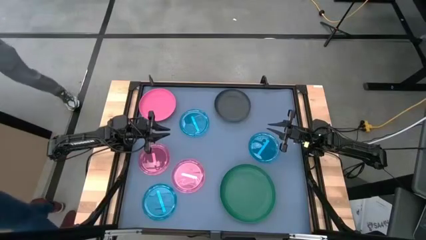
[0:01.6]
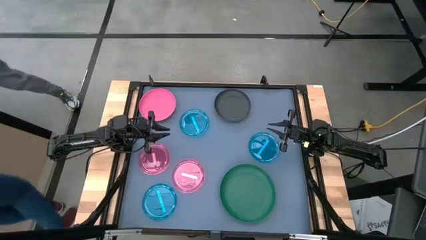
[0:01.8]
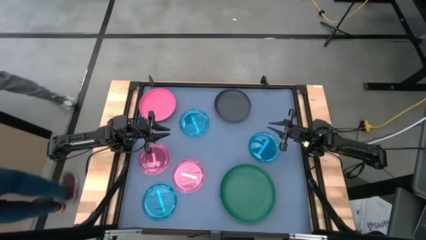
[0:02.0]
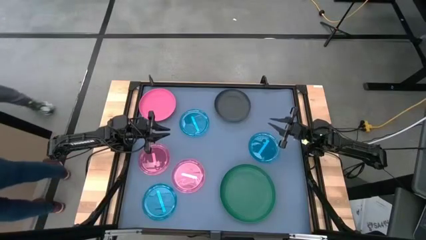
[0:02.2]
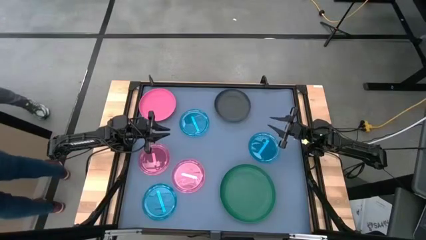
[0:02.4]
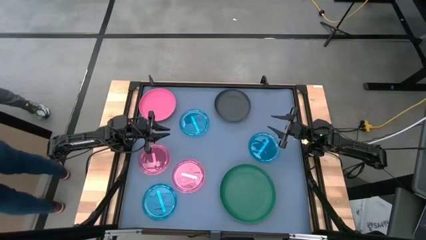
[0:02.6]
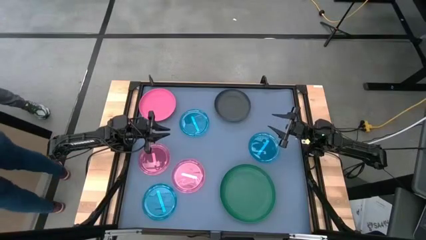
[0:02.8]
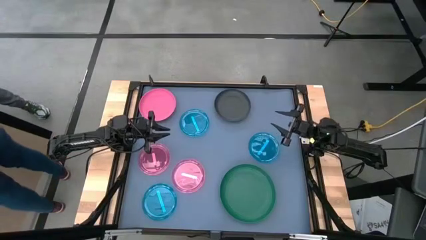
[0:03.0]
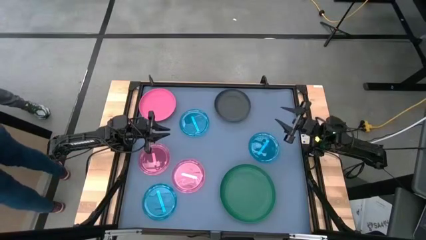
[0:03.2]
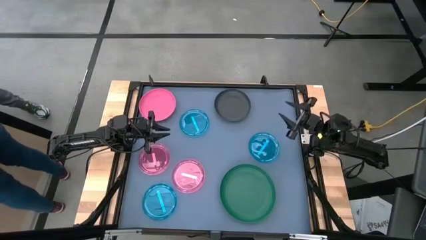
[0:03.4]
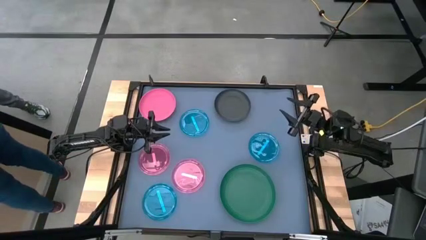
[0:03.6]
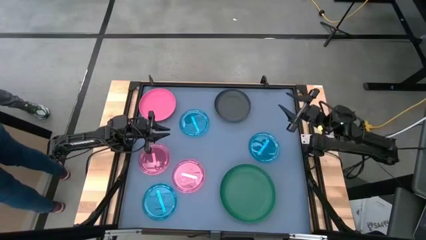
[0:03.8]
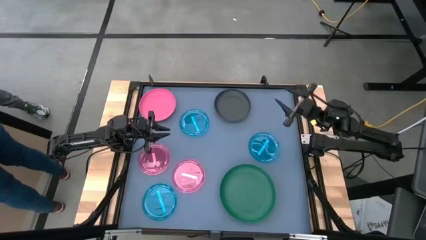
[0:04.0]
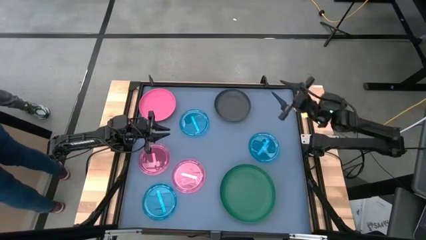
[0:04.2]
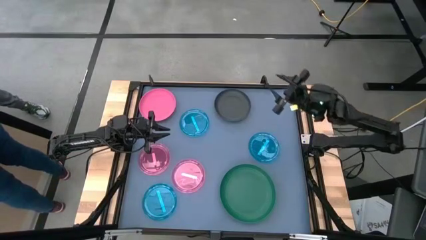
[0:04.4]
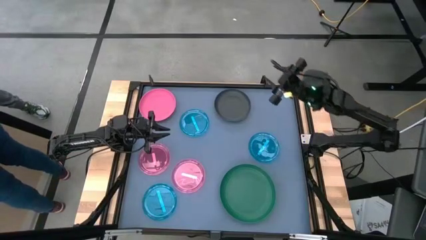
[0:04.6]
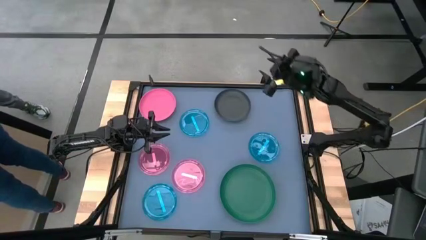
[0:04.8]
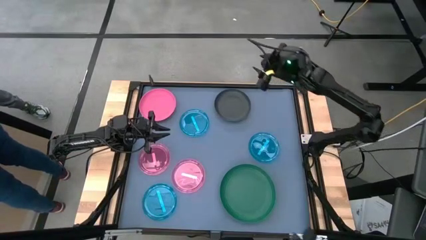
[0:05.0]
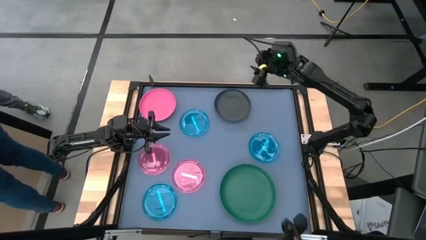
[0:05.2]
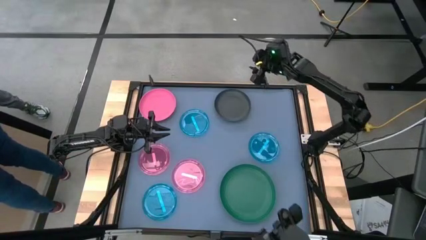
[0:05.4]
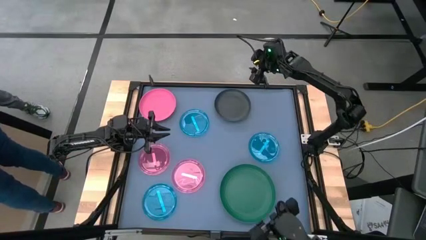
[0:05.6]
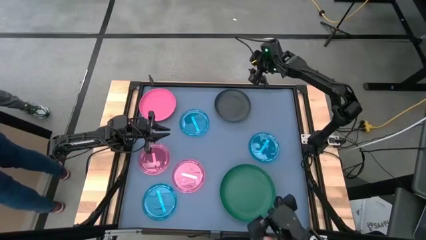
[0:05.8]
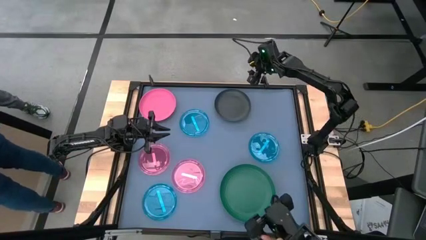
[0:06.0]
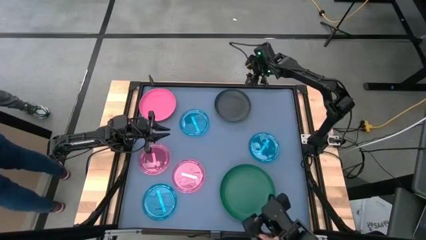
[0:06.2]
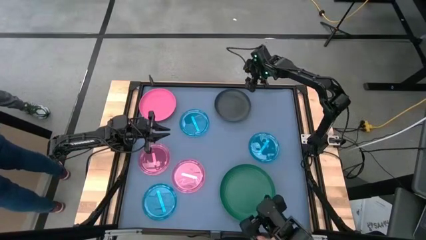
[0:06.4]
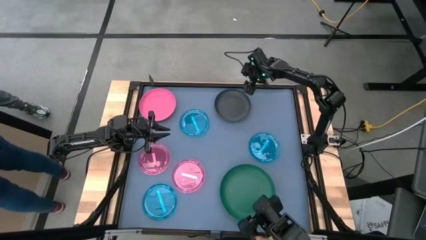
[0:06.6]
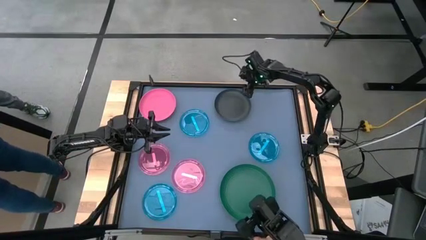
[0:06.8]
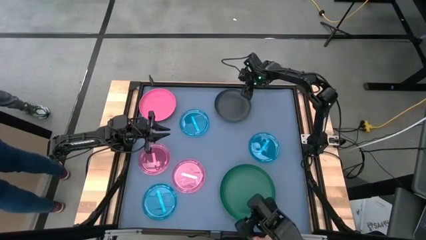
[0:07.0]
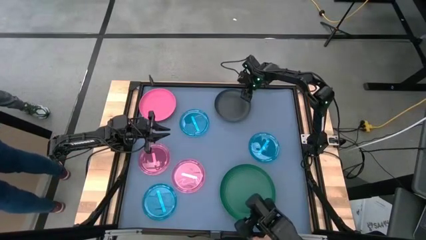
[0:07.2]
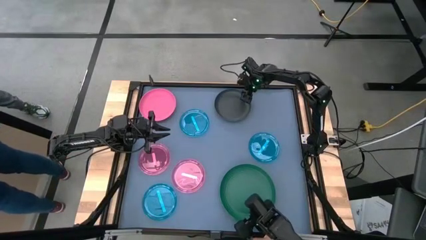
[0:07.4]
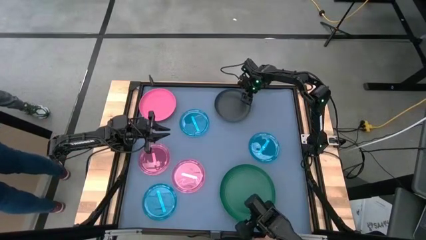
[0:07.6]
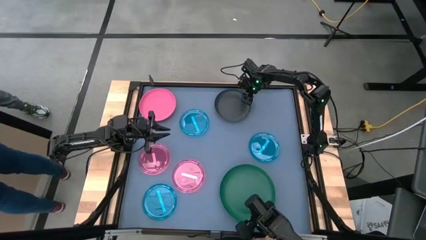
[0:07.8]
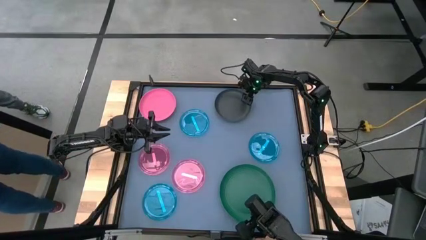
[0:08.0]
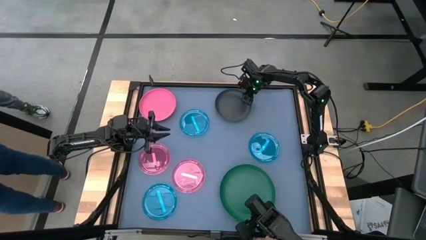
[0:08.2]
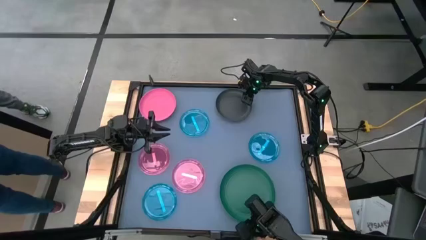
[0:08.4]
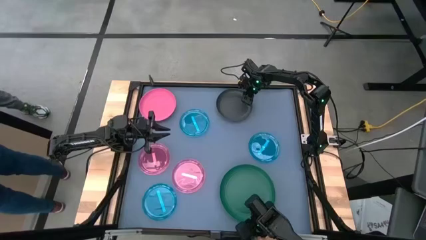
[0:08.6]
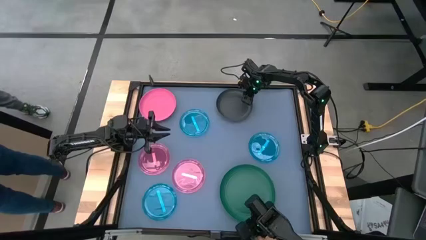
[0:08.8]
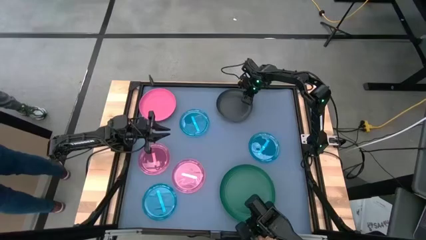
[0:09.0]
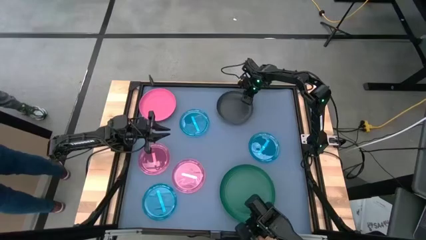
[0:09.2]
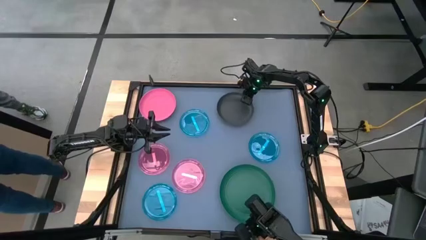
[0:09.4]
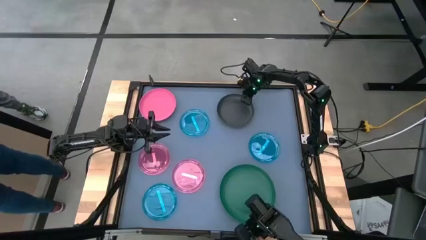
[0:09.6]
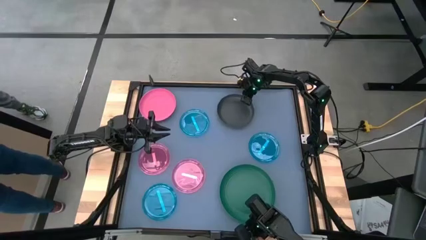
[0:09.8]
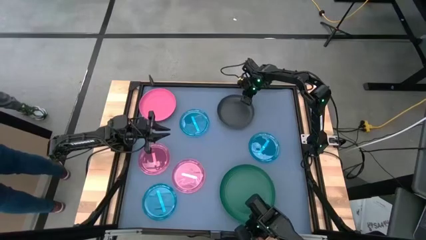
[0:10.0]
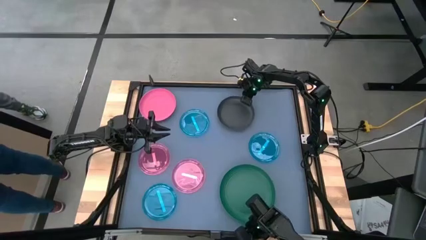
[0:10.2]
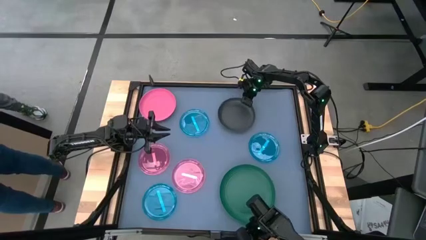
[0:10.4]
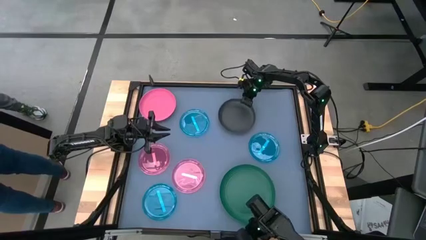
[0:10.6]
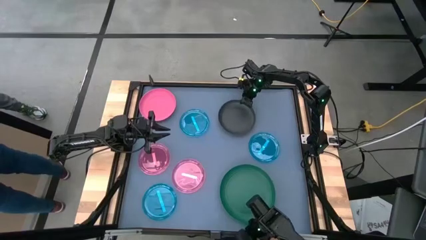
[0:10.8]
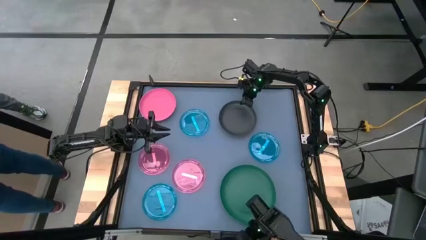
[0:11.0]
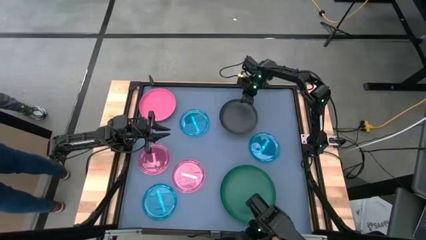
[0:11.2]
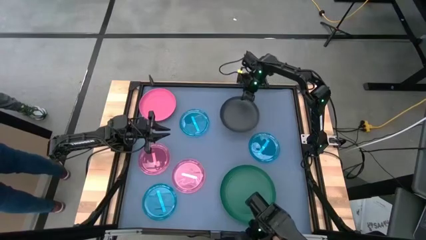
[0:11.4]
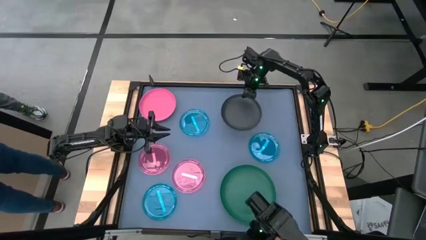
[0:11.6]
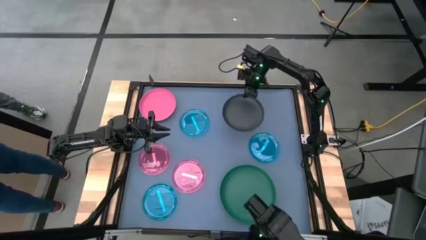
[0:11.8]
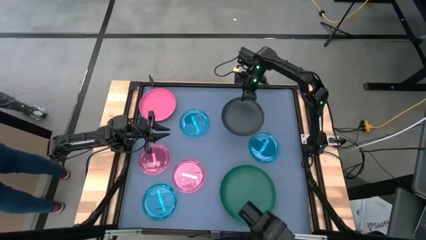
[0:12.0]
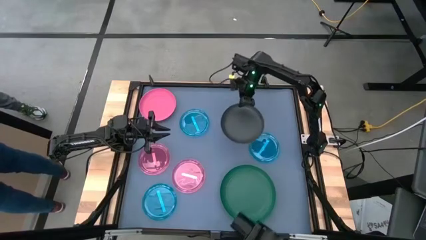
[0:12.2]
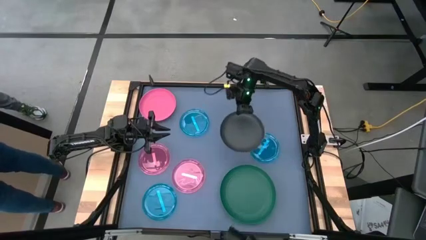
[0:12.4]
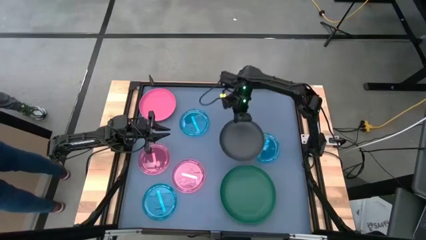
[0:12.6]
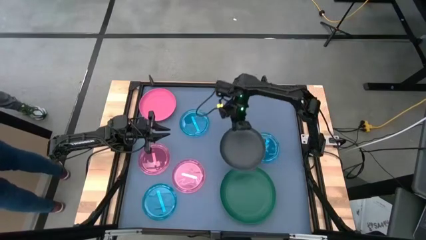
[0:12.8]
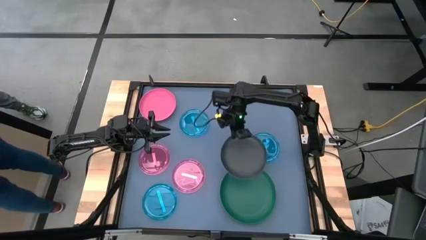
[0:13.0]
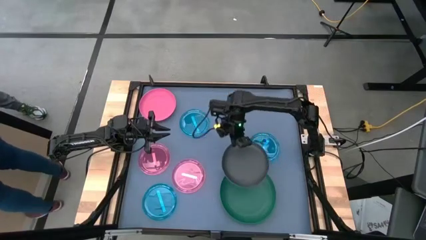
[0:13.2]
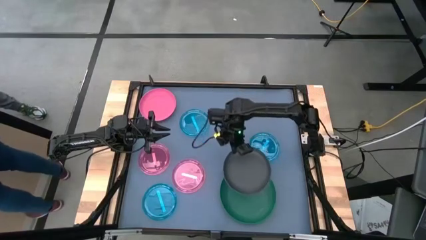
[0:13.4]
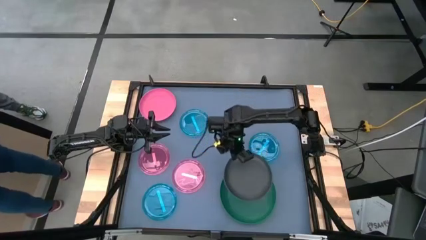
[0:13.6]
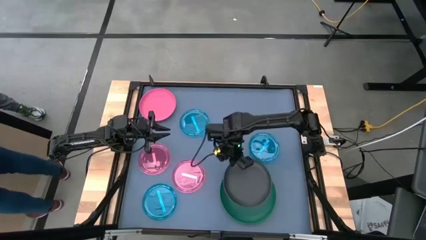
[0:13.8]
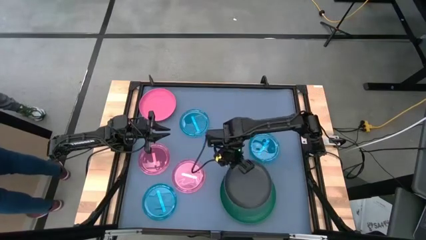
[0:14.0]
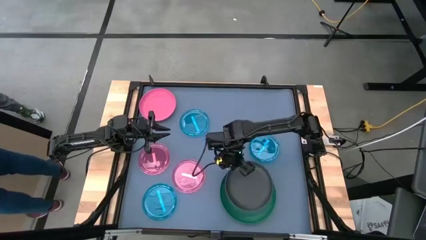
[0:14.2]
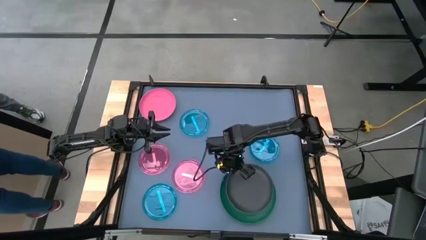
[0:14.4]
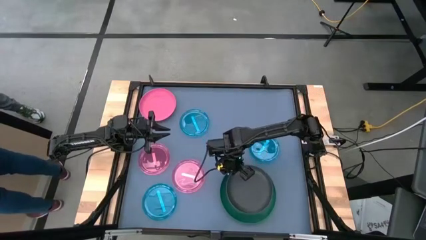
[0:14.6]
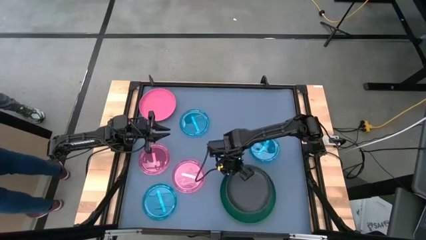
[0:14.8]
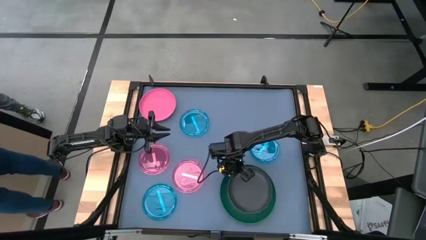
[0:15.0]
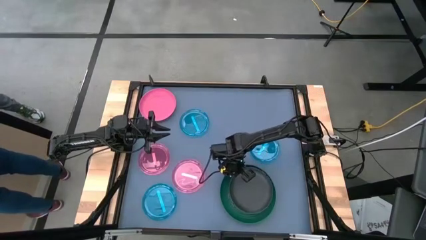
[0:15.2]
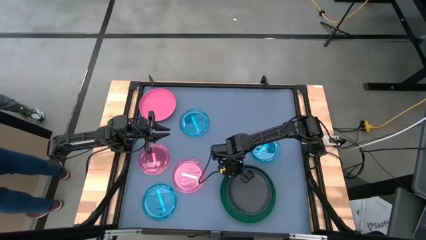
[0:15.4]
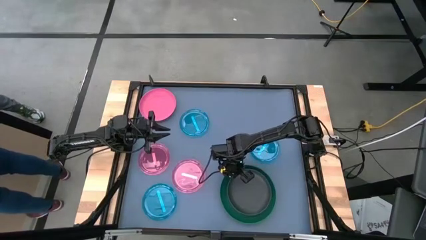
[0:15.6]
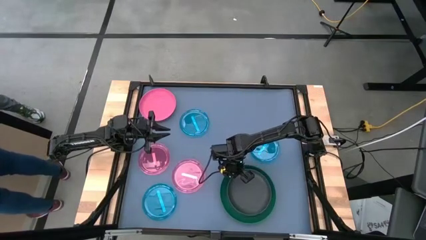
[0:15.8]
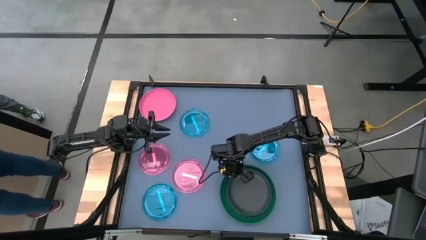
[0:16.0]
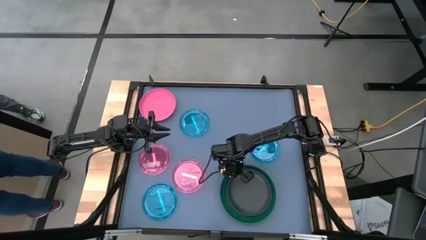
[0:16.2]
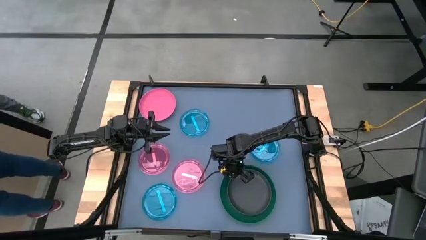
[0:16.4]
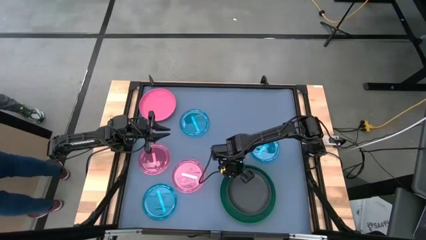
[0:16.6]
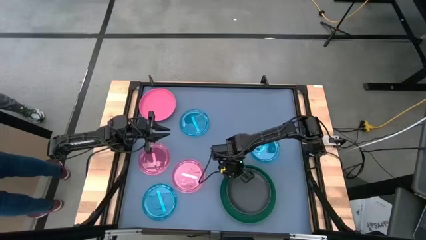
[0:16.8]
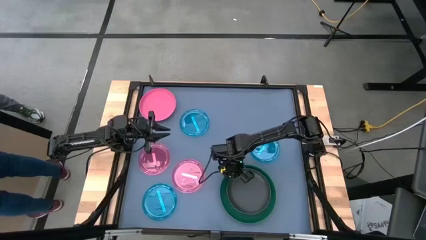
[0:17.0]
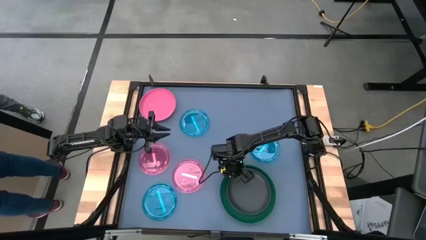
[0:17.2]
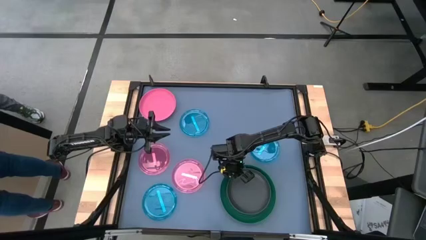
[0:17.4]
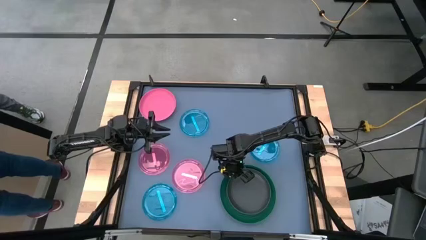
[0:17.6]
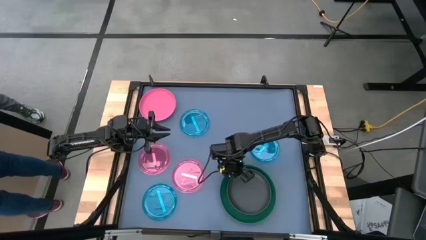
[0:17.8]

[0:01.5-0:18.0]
Task: Stack plastic plates
Stack the black plate on top of the green plate
